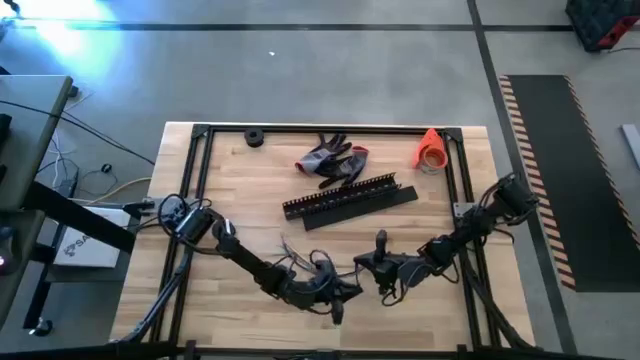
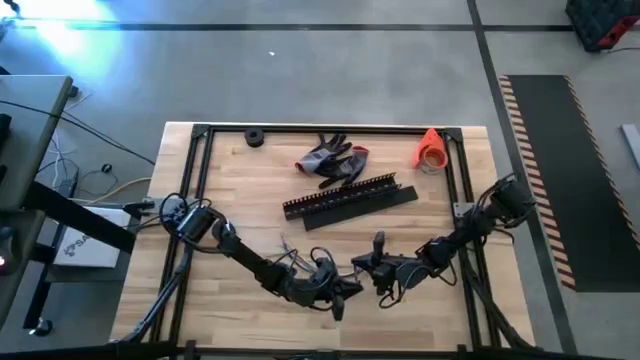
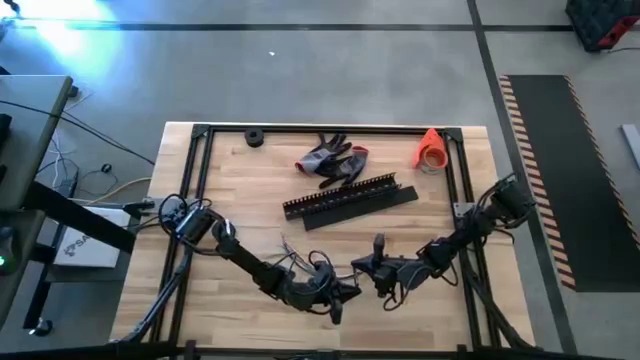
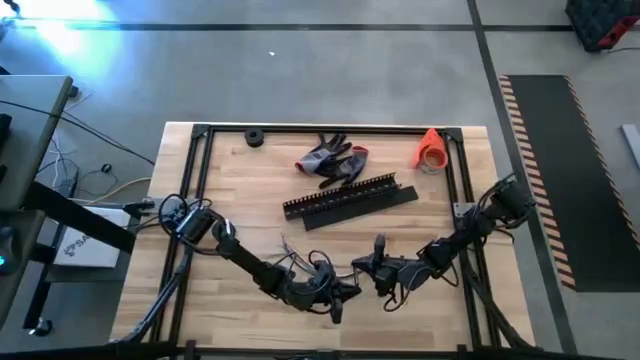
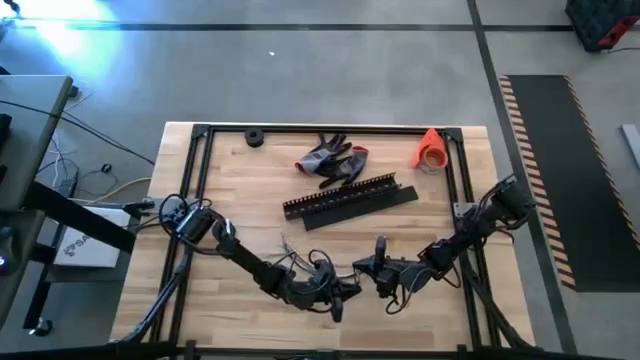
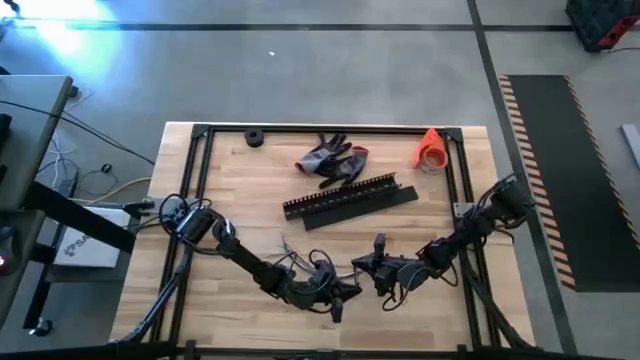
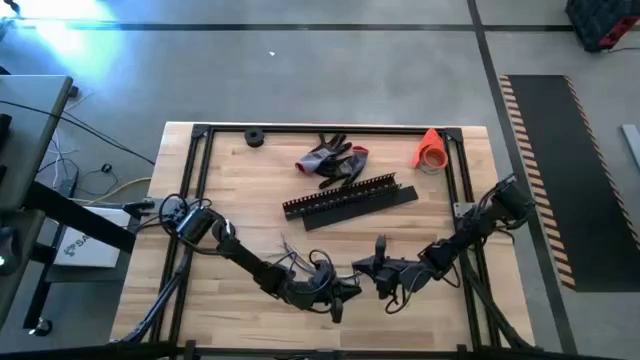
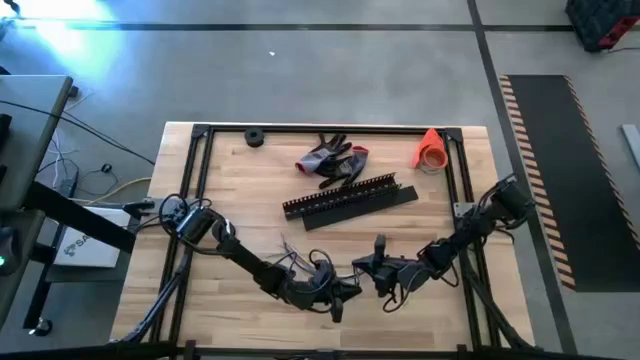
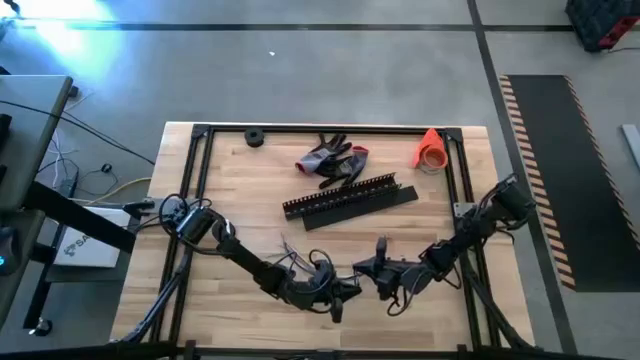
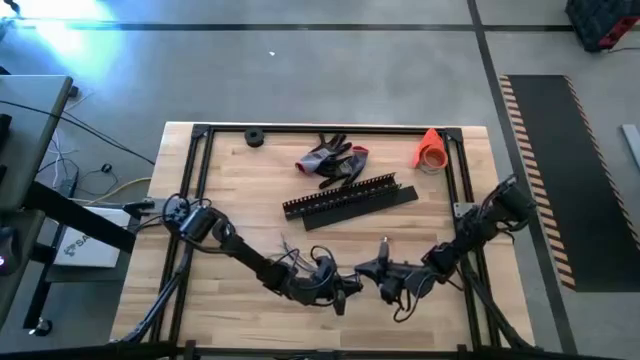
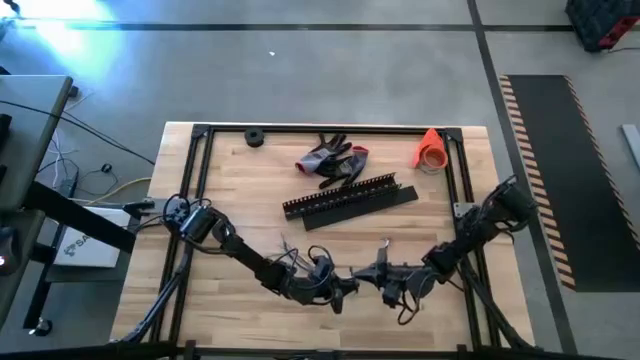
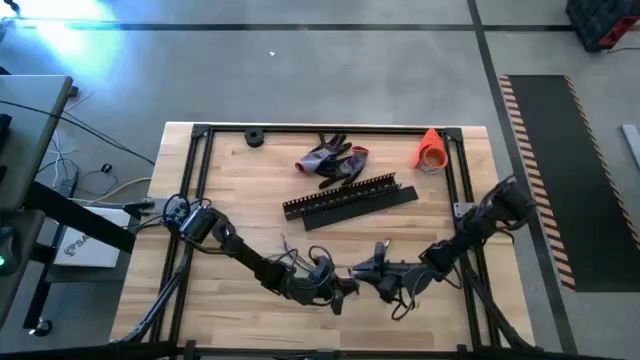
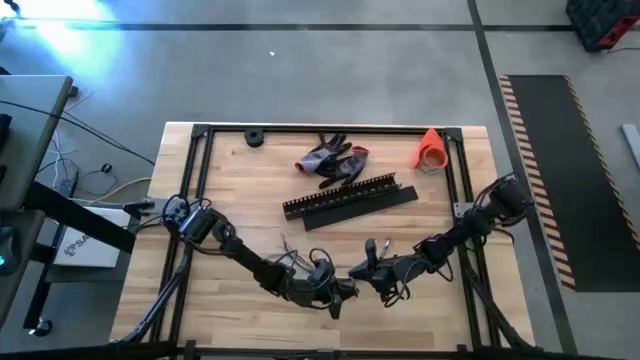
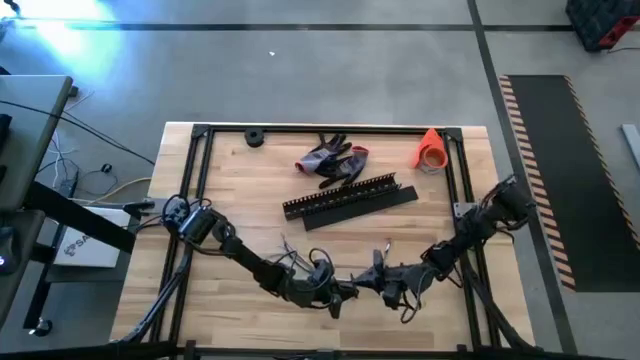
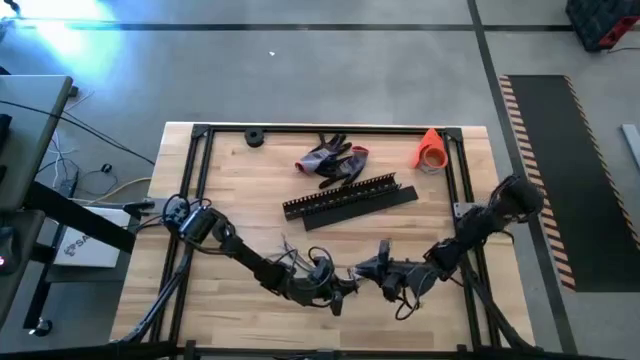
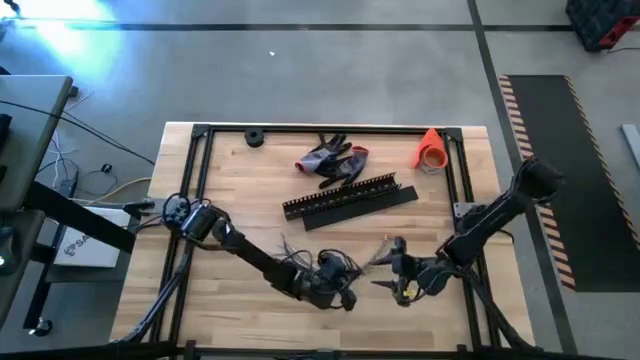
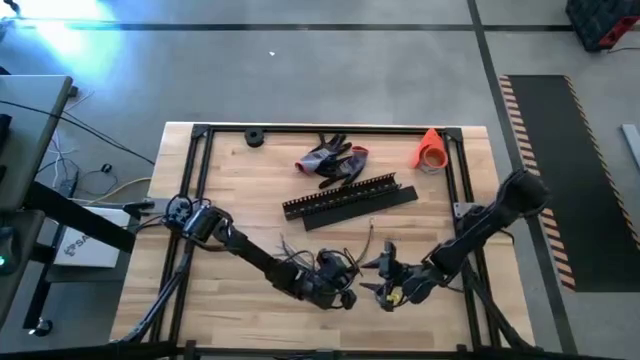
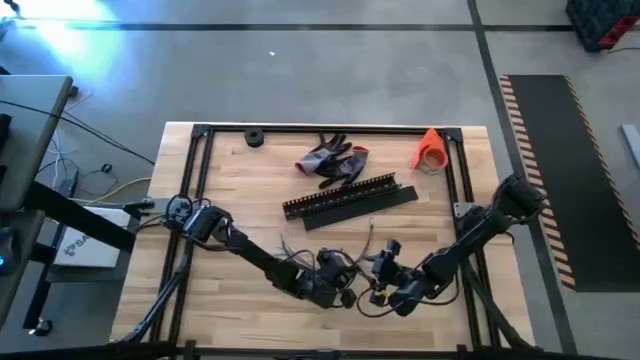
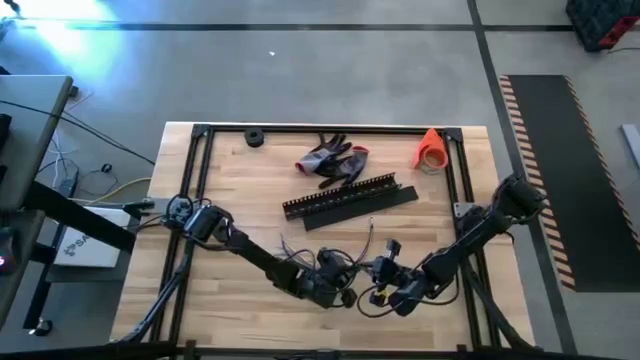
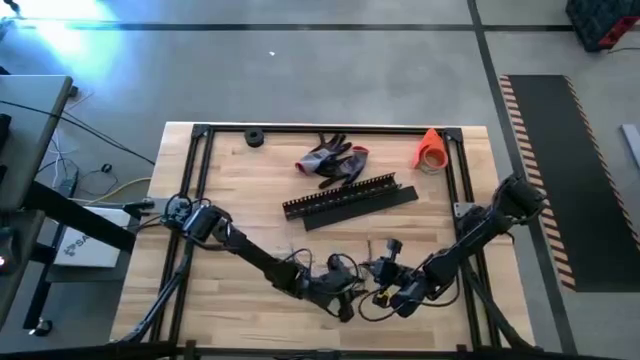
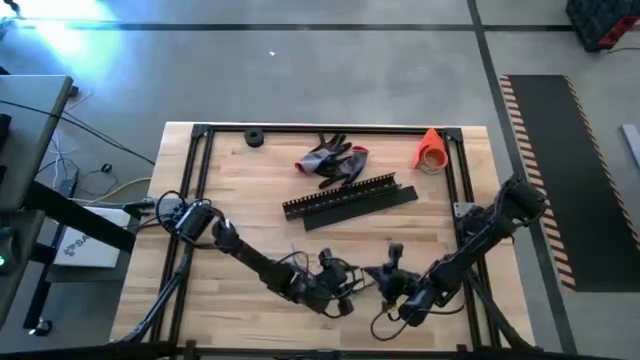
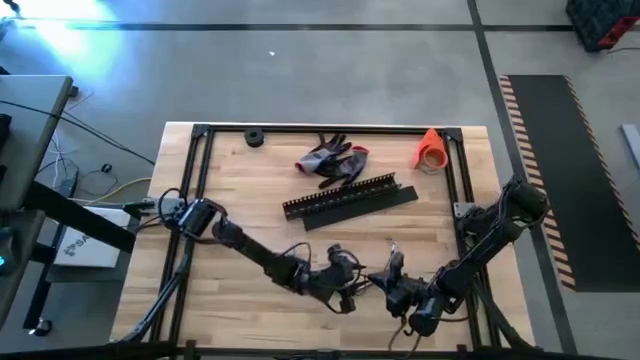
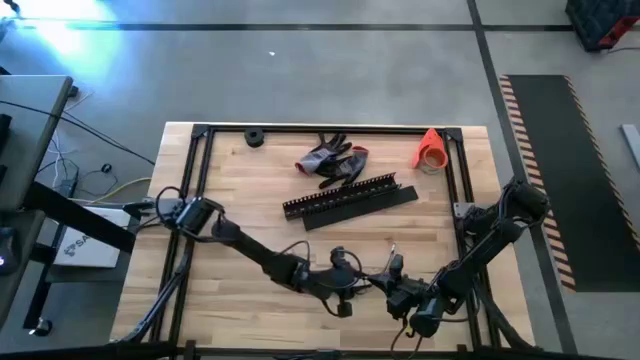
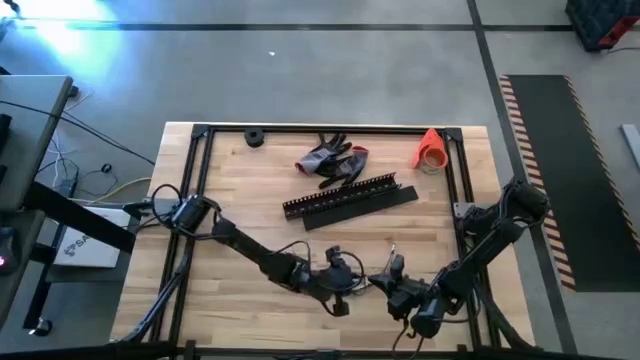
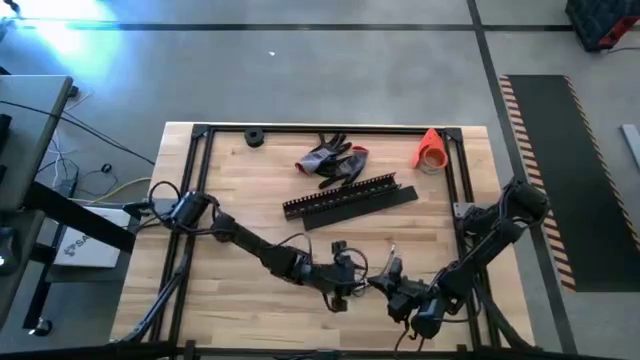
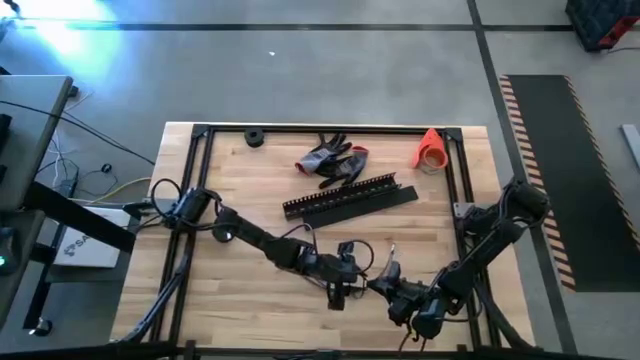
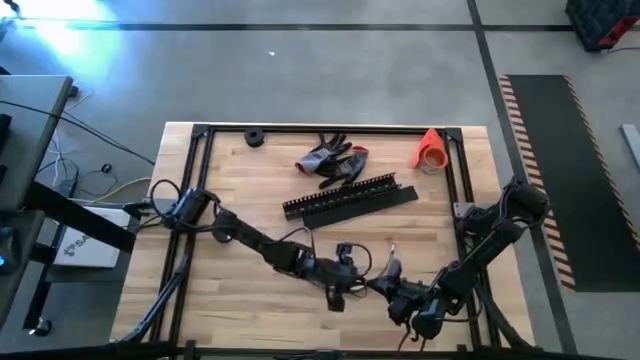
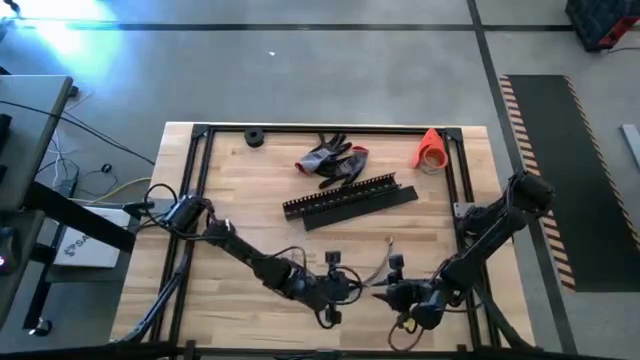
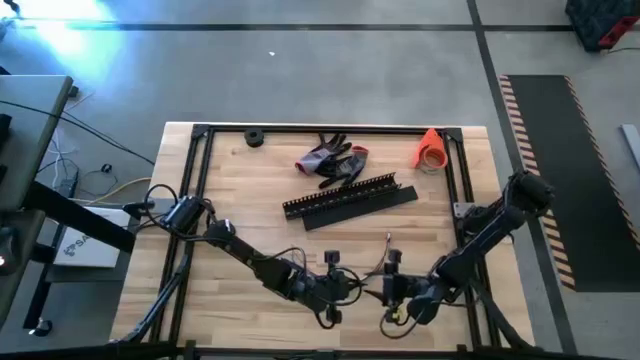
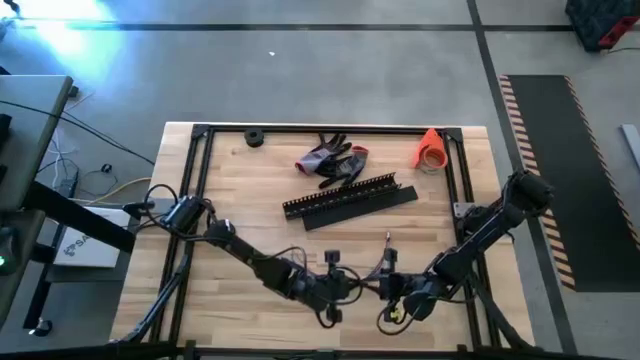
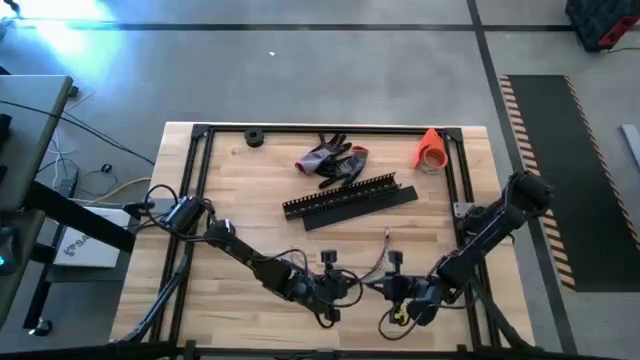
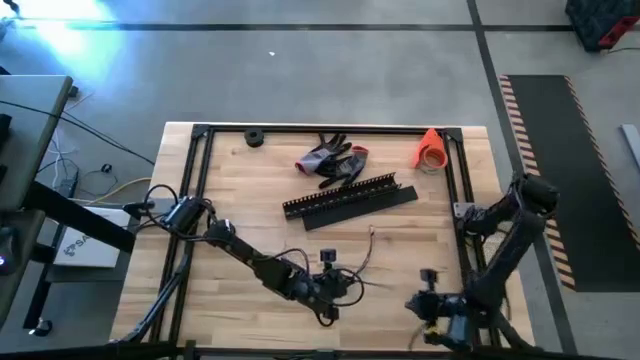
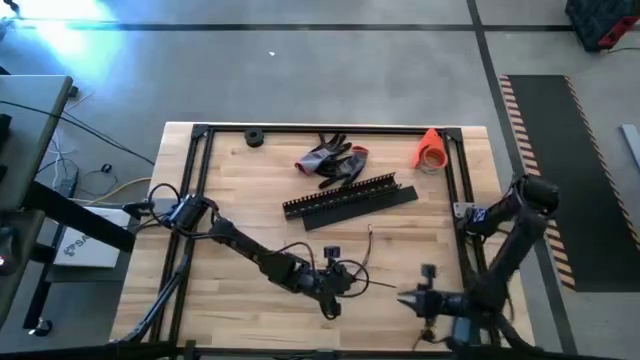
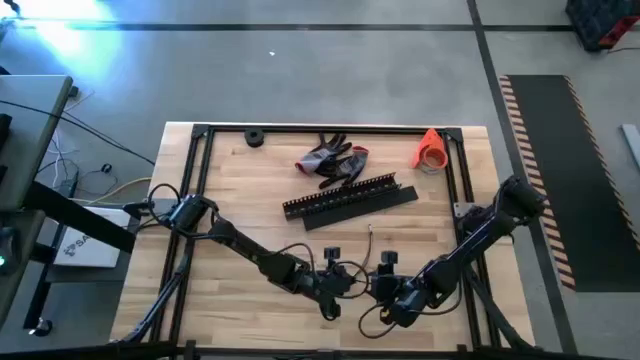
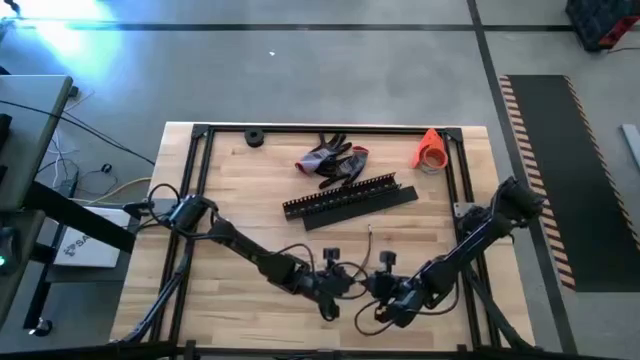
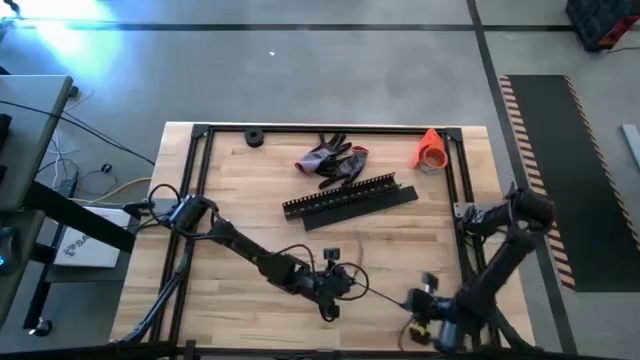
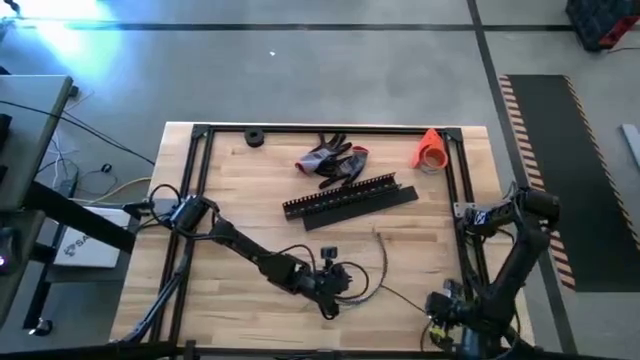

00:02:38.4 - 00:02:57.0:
Task: Ziptie cables
Wrap the cables using a black zip tie

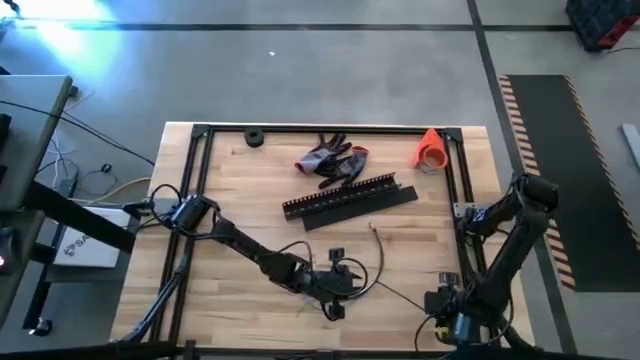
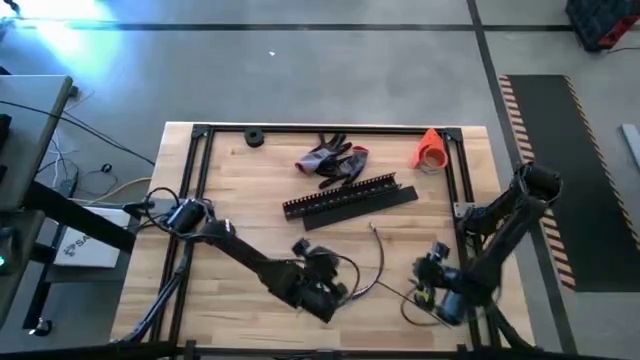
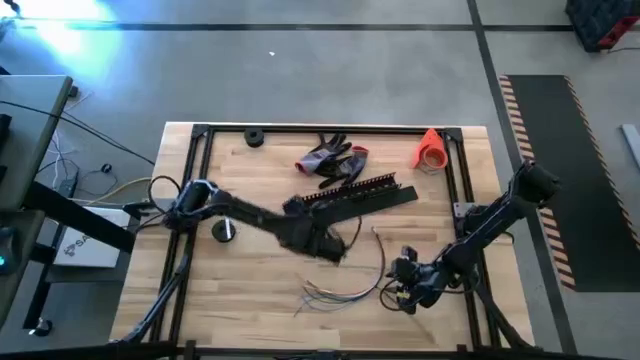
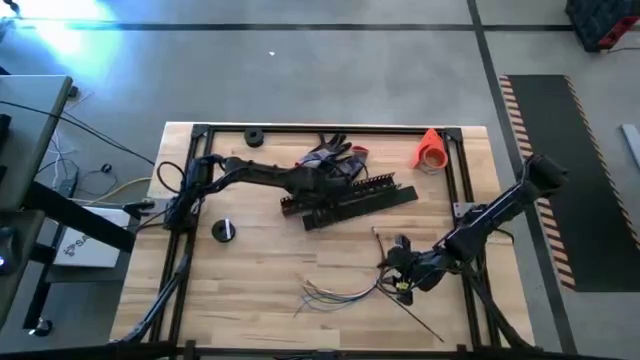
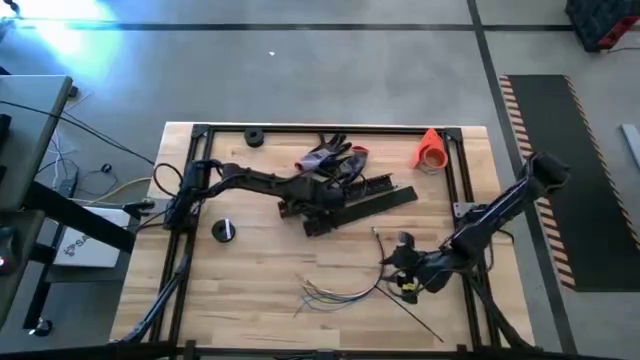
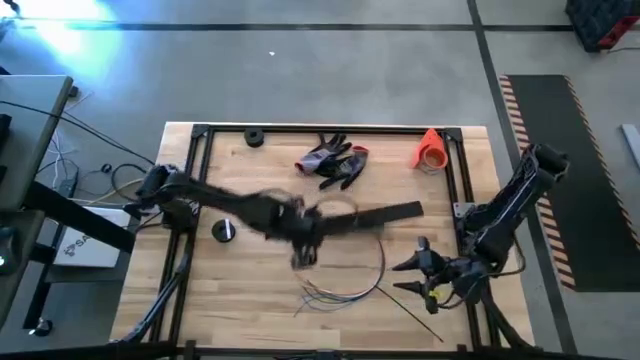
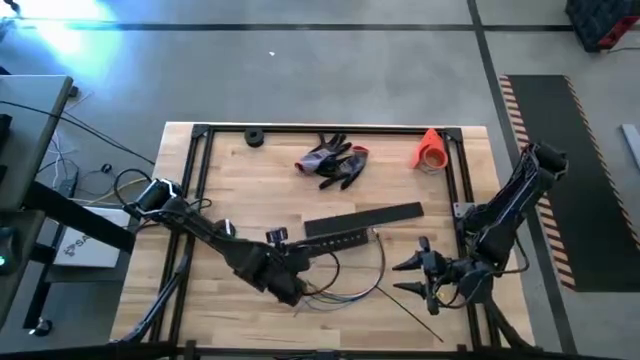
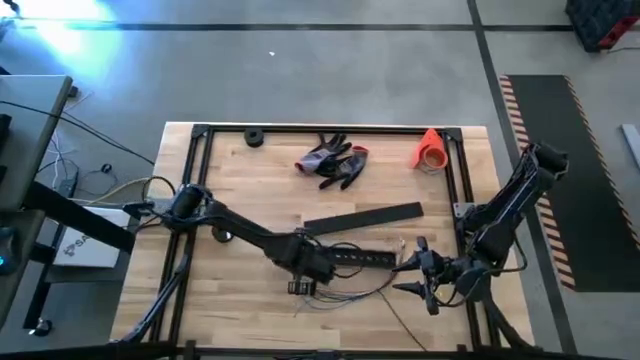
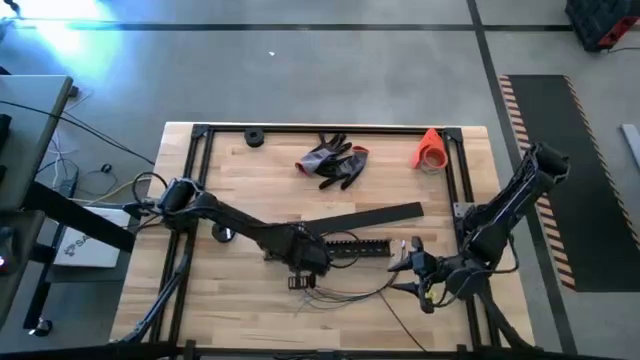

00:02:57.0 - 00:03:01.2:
Move the black cable duct to the center of the table
